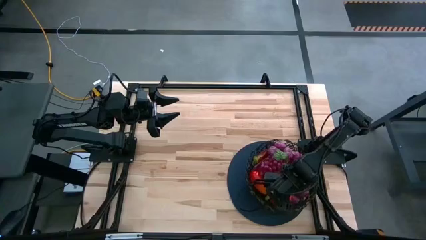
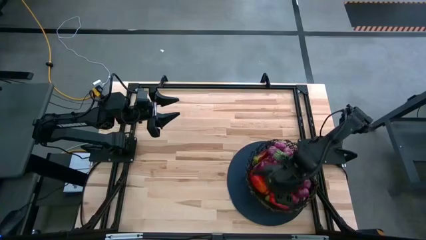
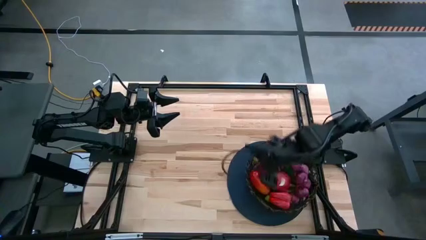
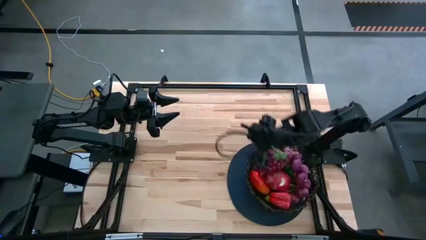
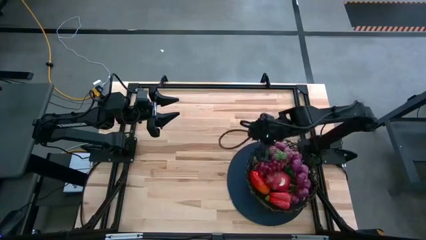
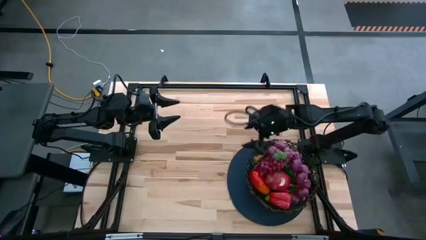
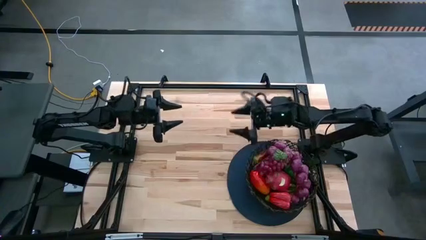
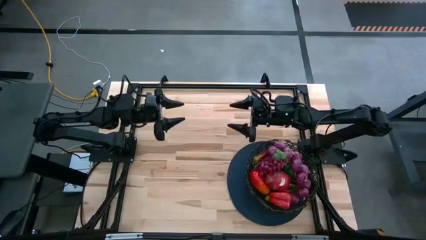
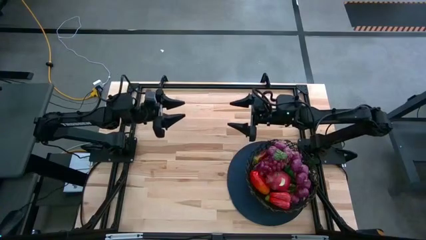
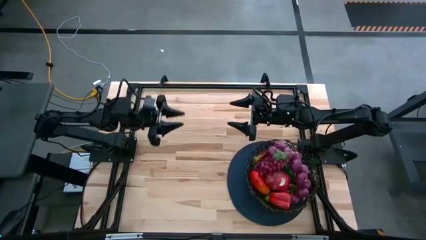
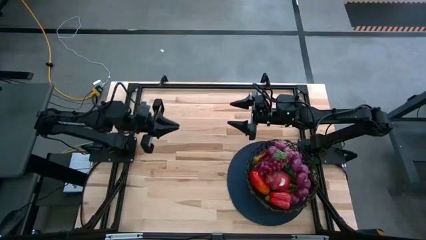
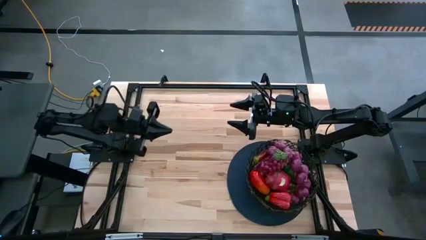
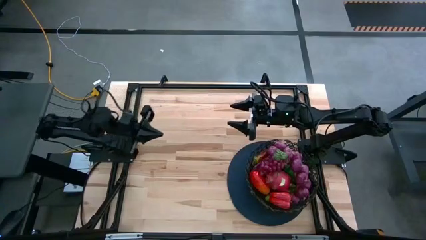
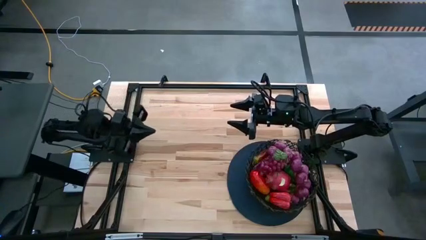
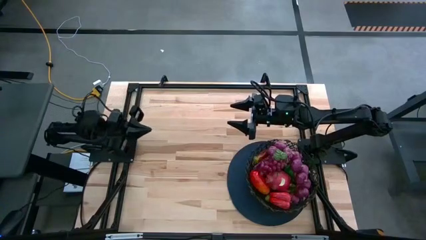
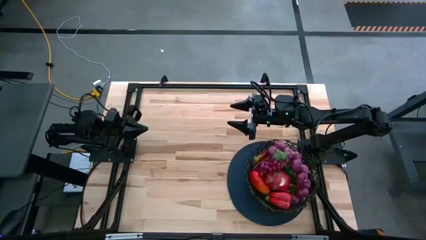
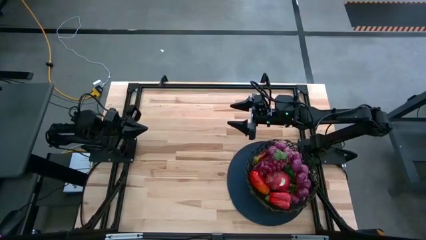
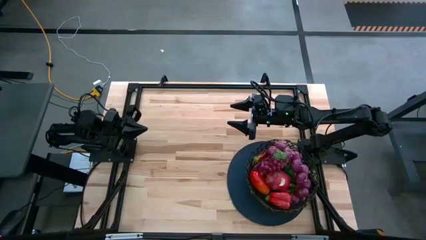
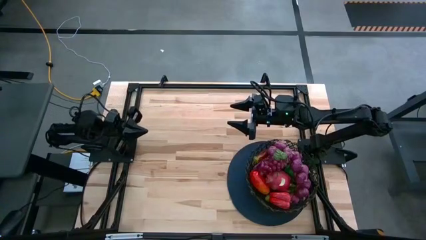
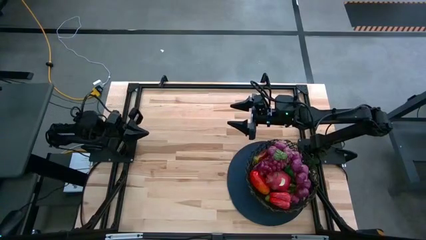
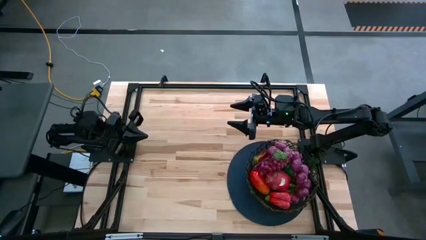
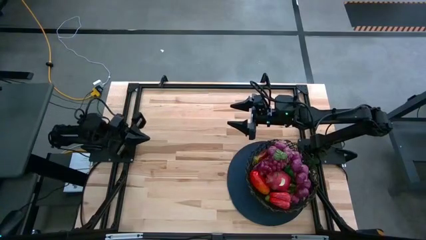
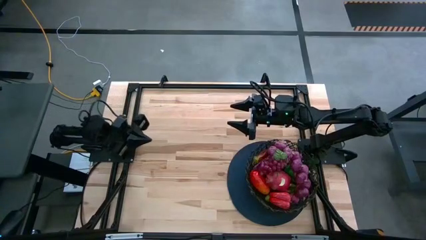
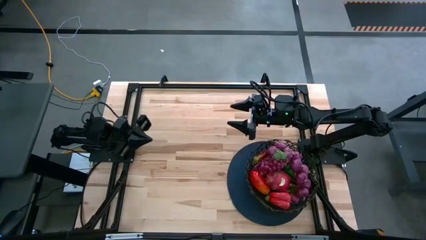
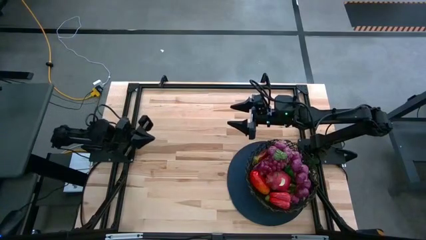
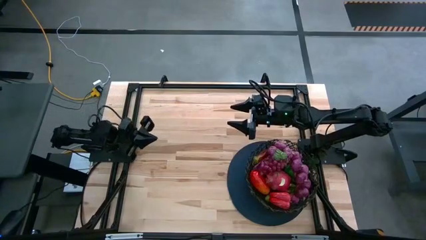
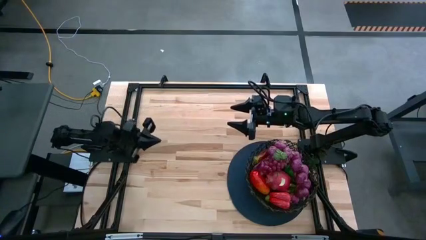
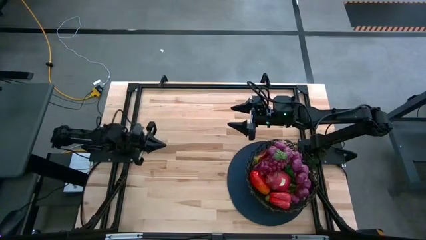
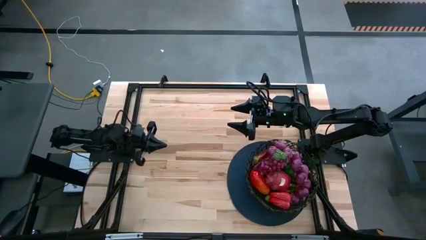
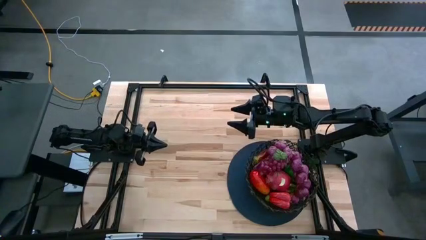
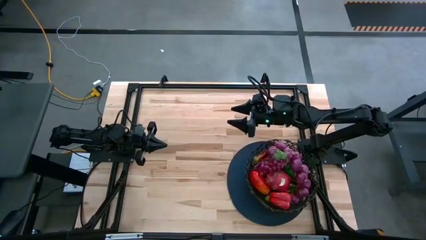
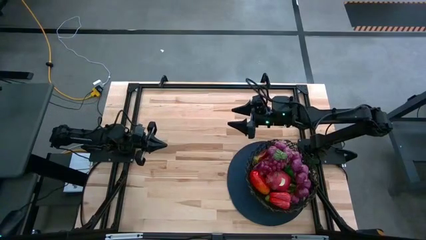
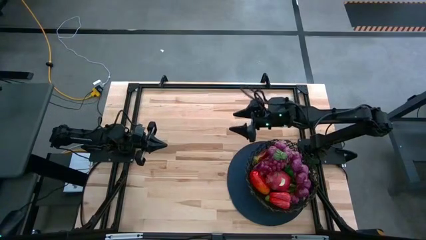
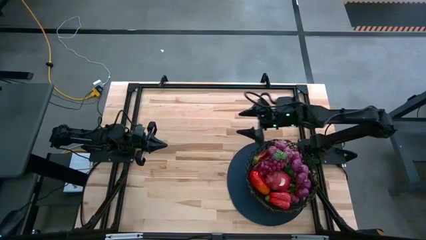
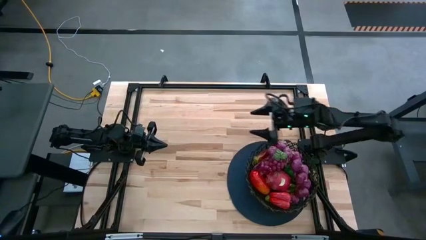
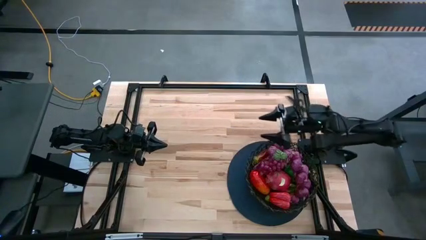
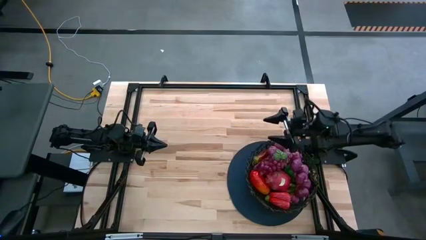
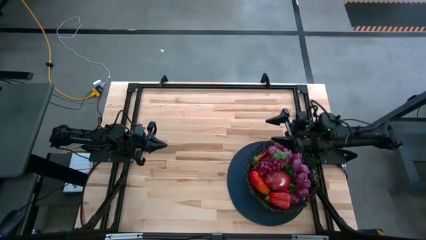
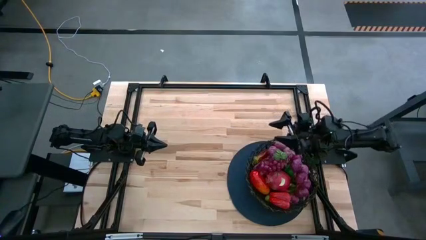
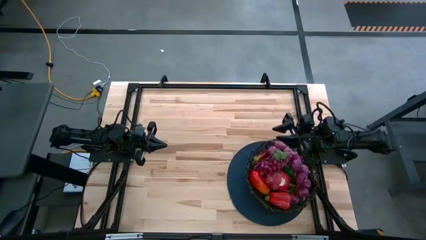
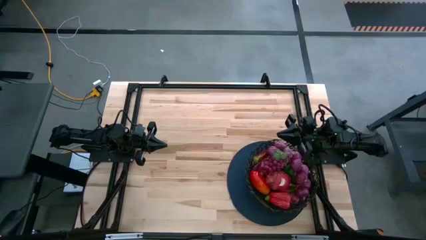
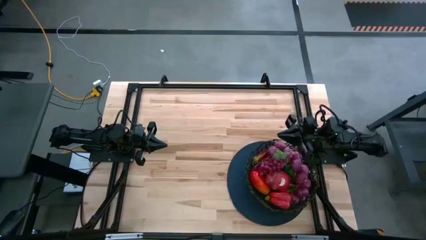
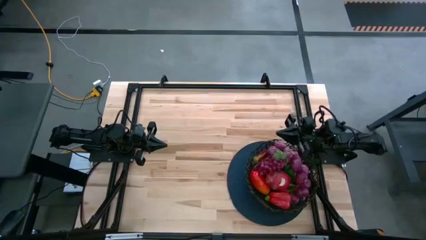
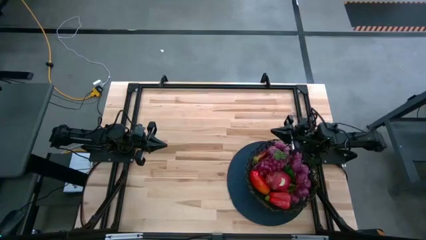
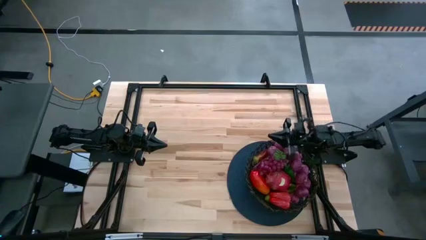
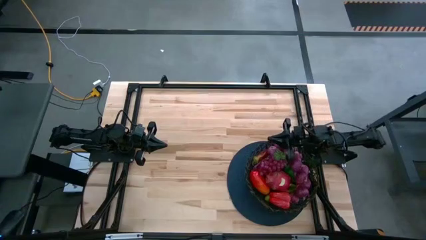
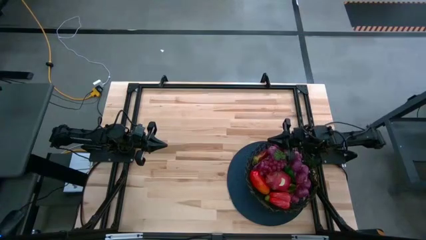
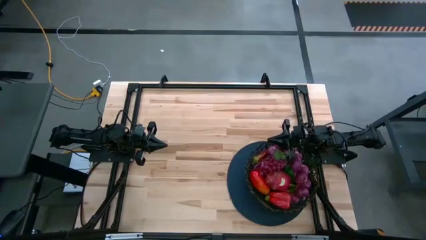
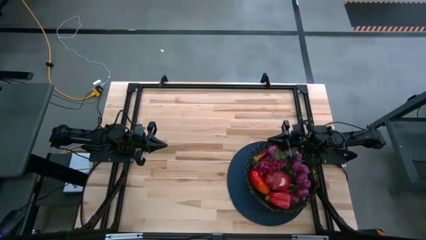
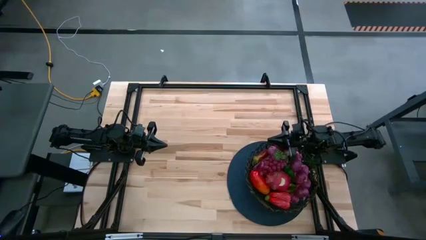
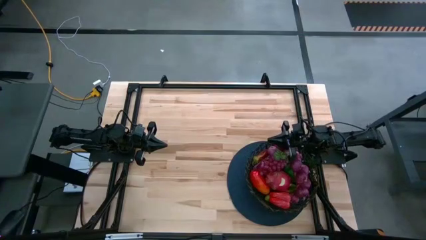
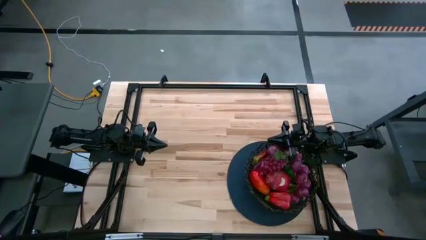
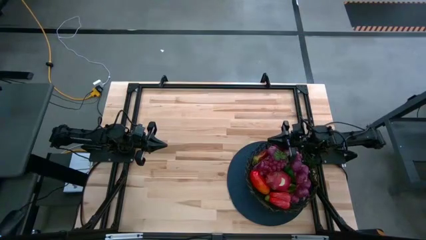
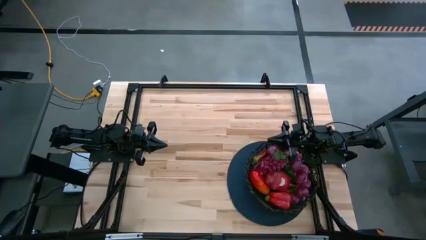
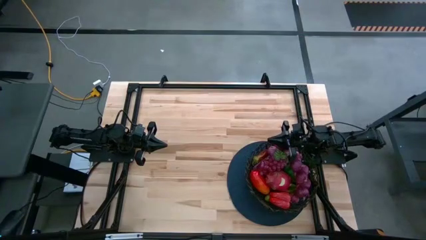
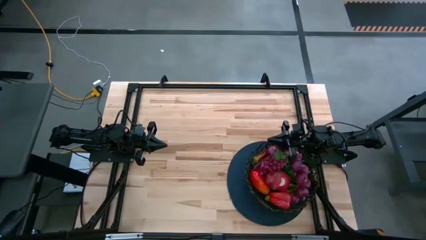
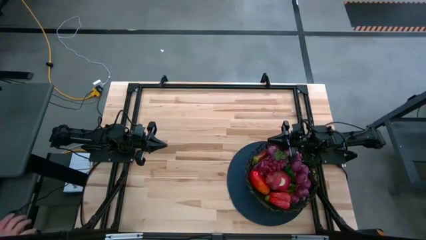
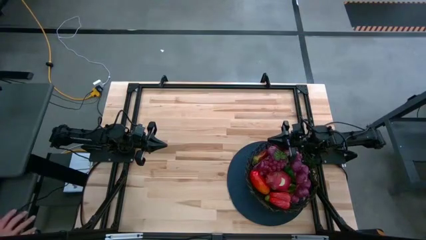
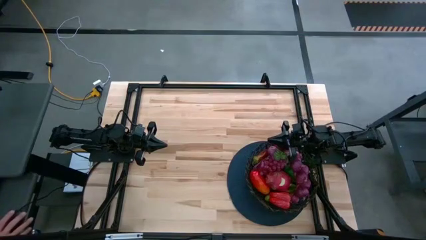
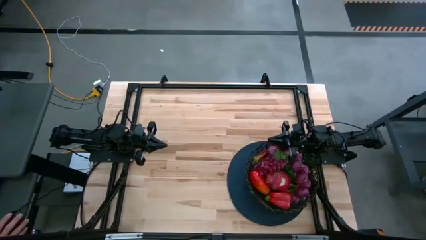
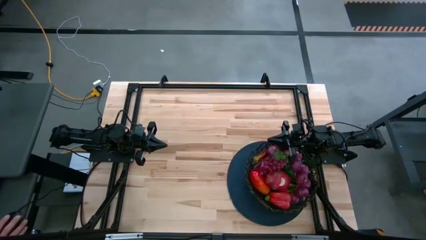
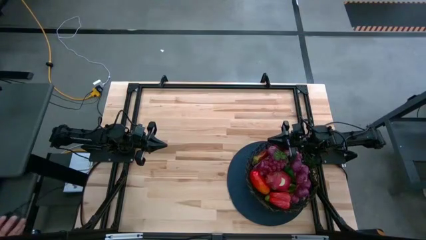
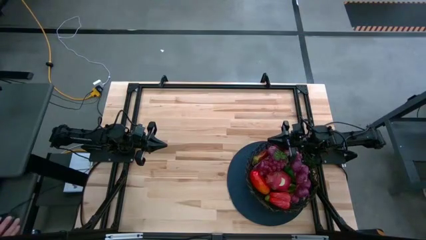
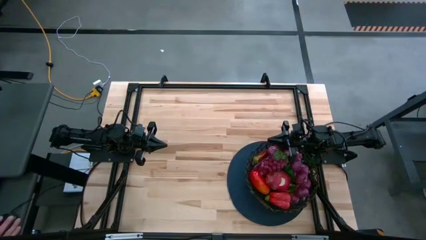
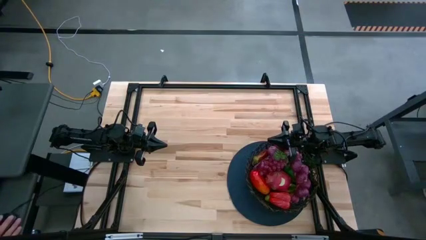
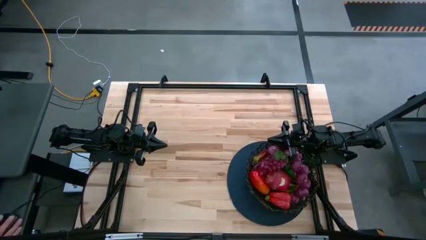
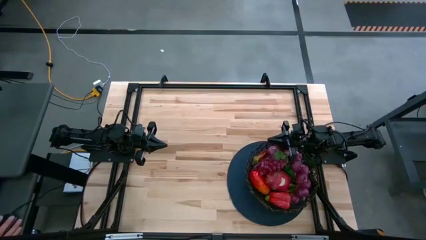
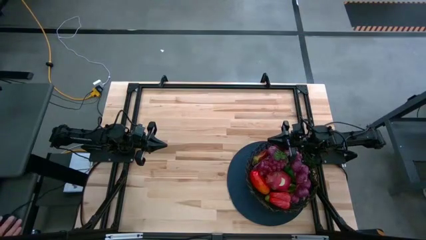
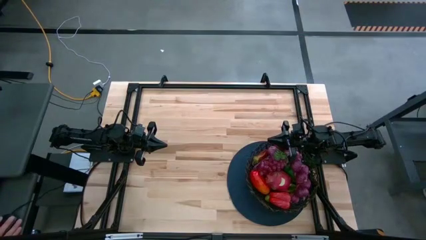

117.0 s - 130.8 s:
Task: Build produce basket
Return to Home Position
